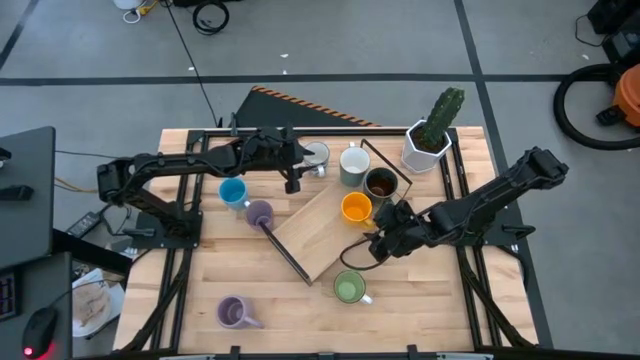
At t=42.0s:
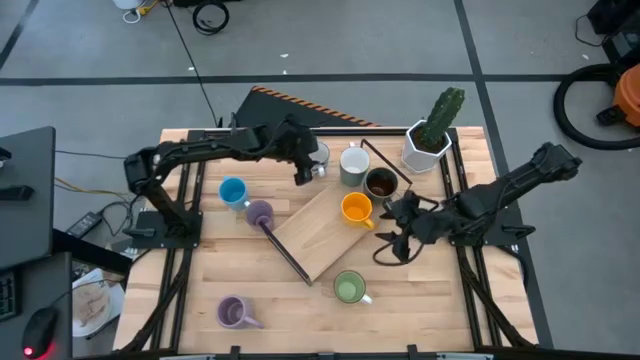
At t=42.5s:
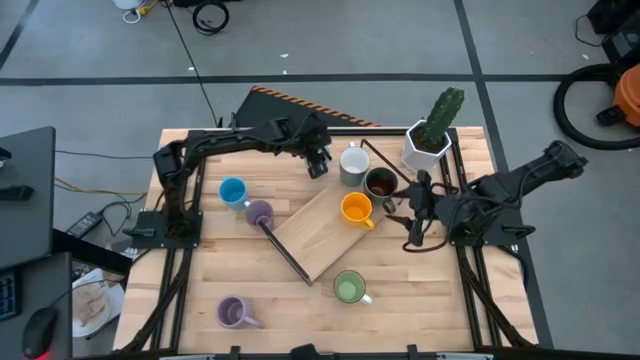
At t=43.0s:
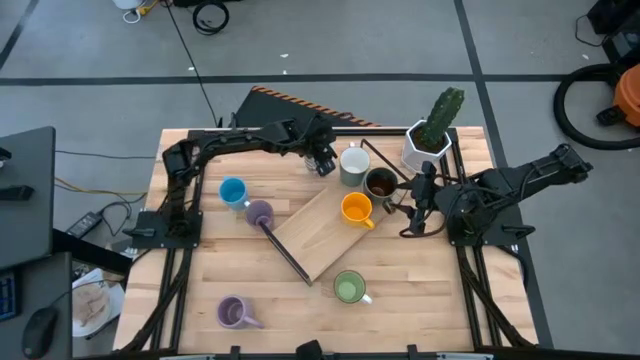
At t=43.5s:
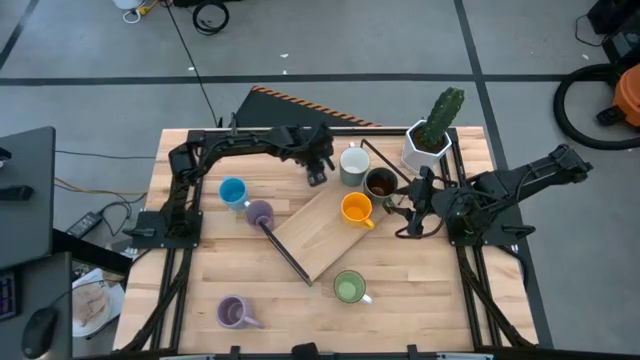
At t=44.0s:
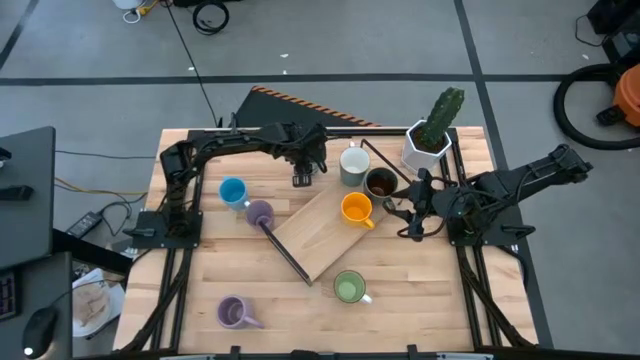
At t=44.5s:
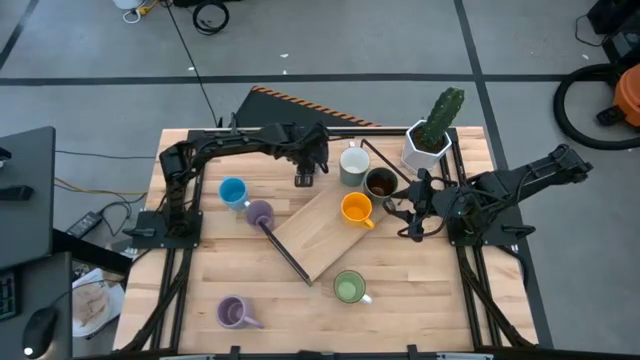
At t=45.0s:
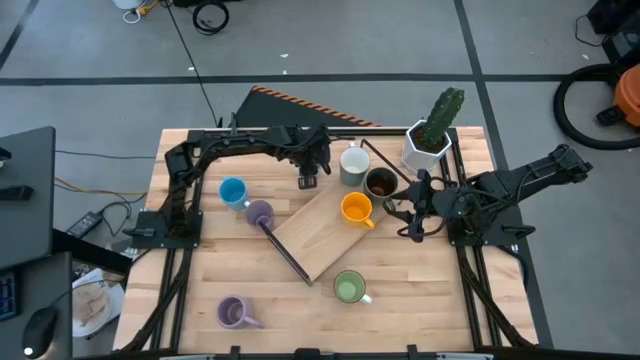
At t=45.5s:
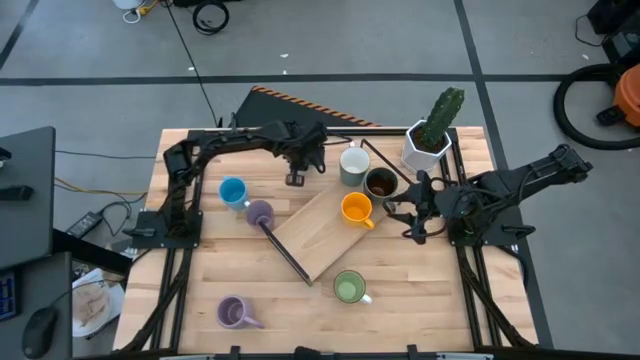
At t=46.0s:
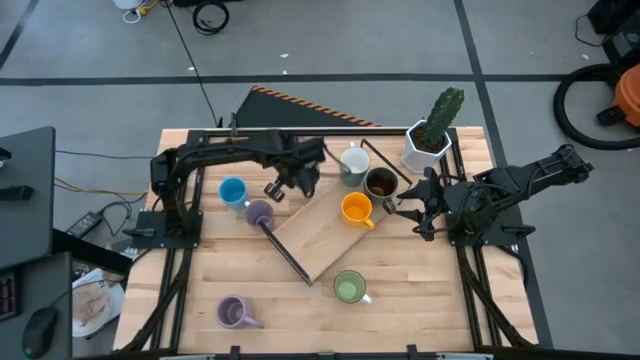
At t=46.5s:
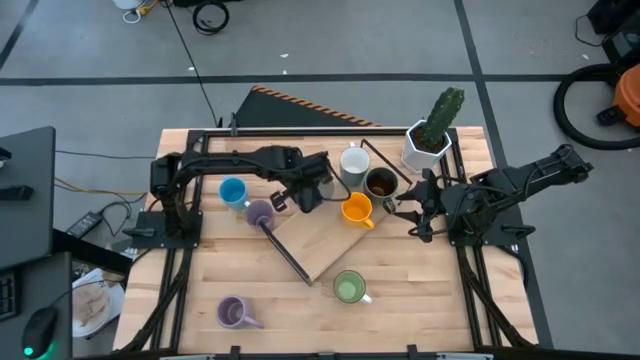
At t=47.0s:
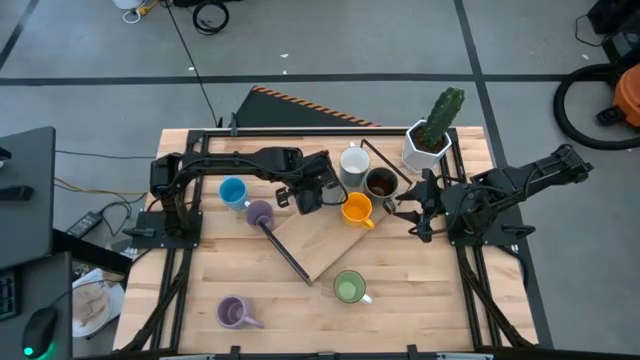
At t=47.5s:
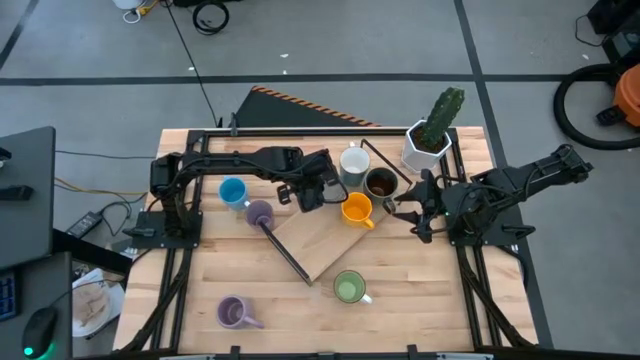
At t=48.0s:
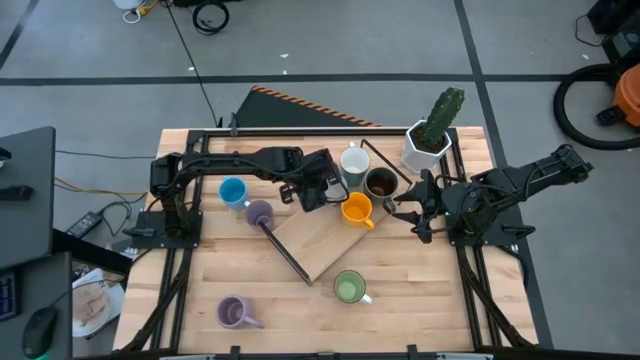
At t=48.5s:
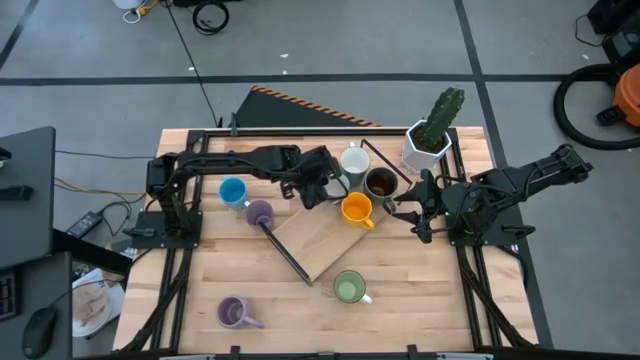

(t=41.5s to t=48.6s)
Task: Place coffee mugs
Put the white-blue mug on the shelf

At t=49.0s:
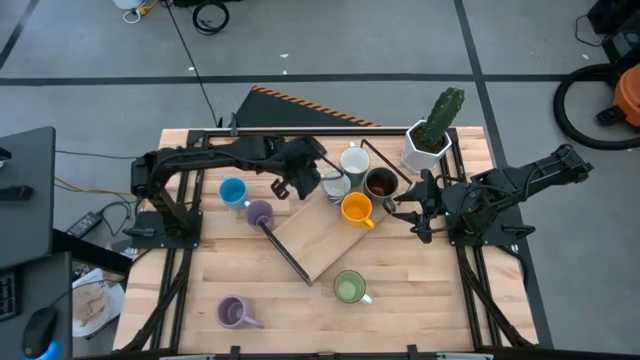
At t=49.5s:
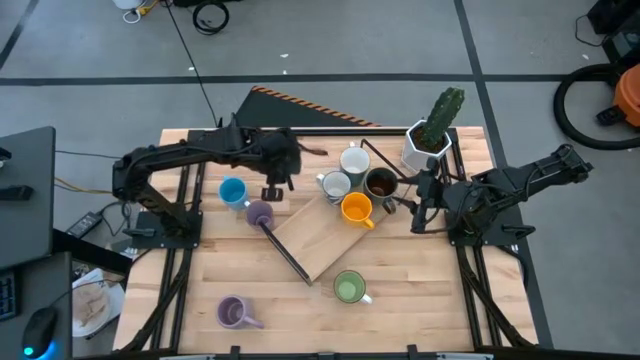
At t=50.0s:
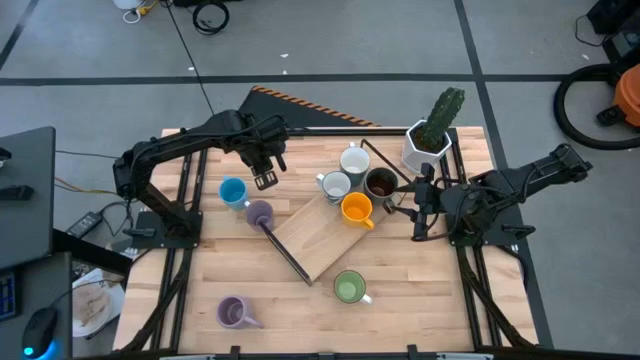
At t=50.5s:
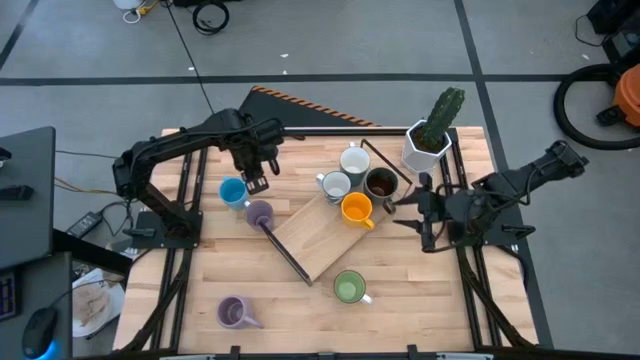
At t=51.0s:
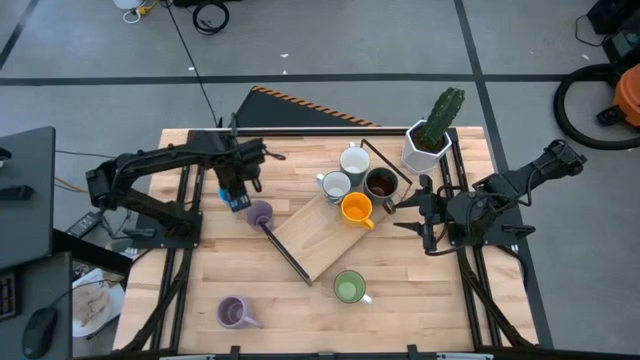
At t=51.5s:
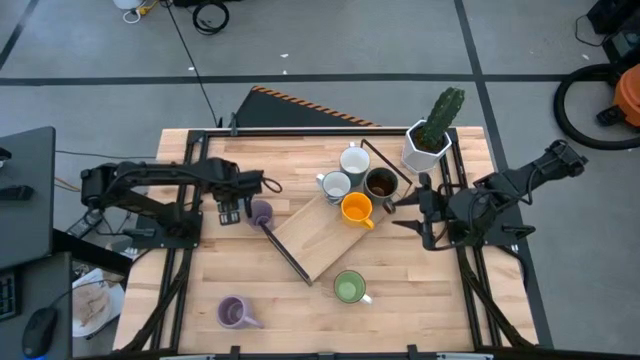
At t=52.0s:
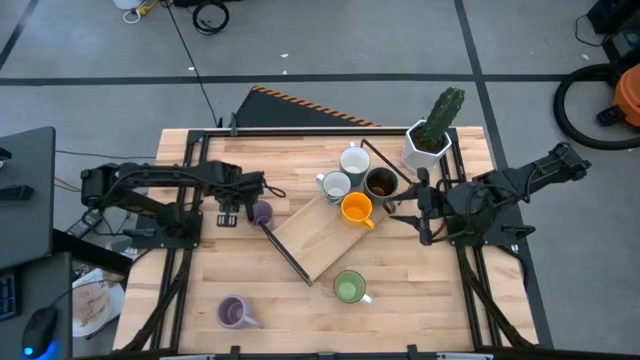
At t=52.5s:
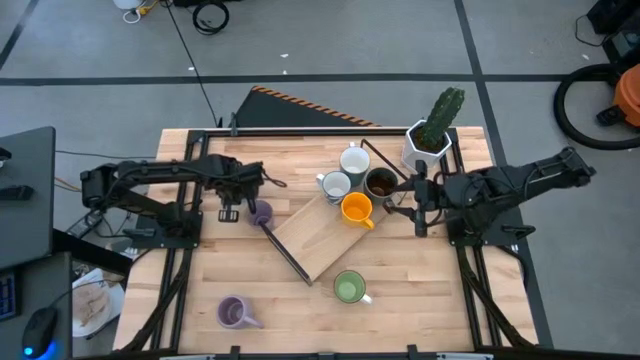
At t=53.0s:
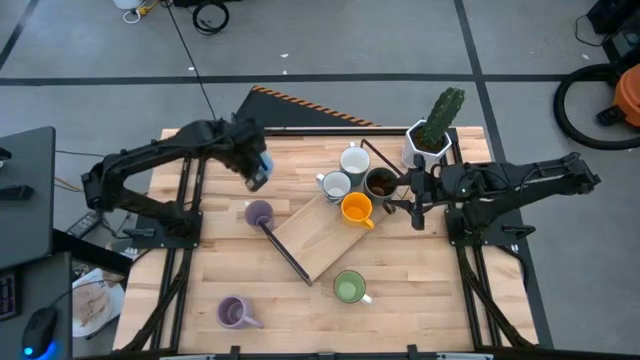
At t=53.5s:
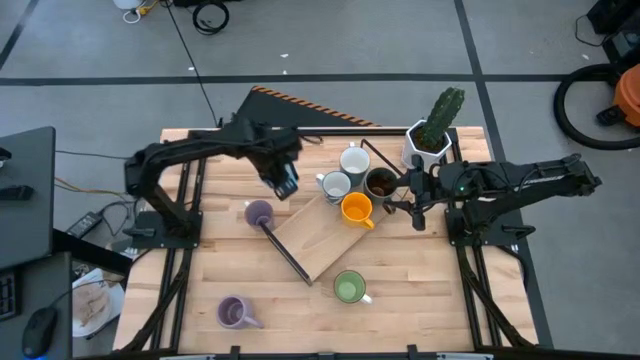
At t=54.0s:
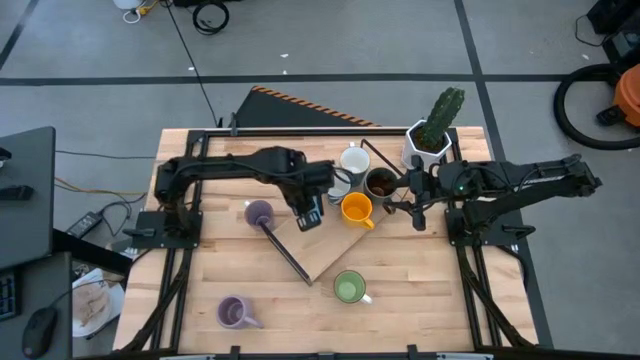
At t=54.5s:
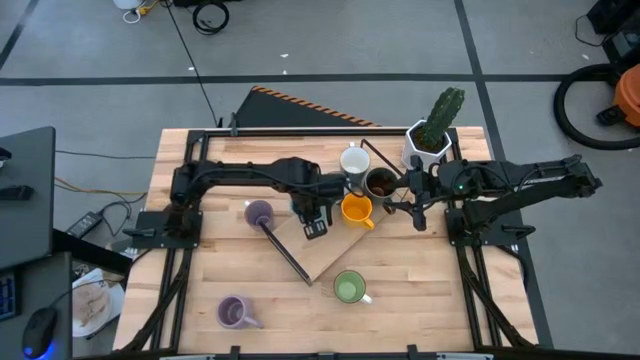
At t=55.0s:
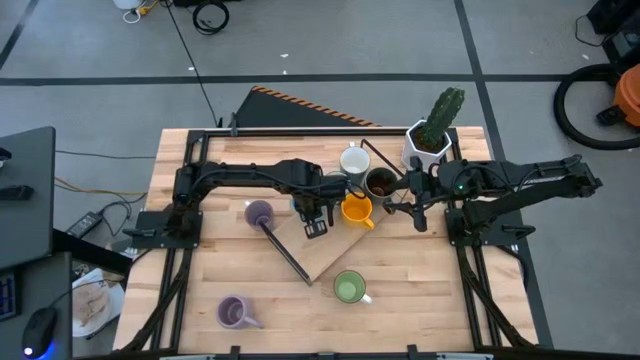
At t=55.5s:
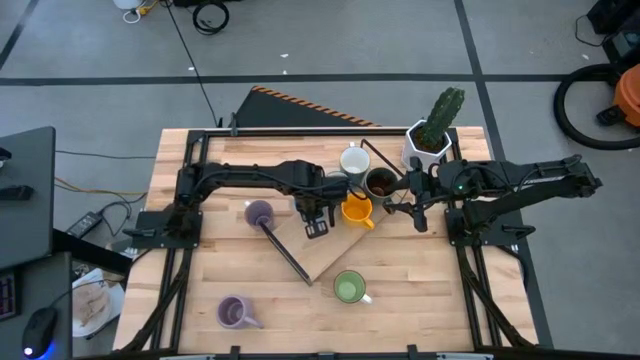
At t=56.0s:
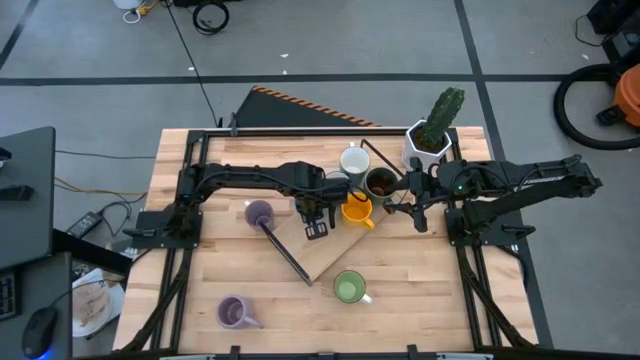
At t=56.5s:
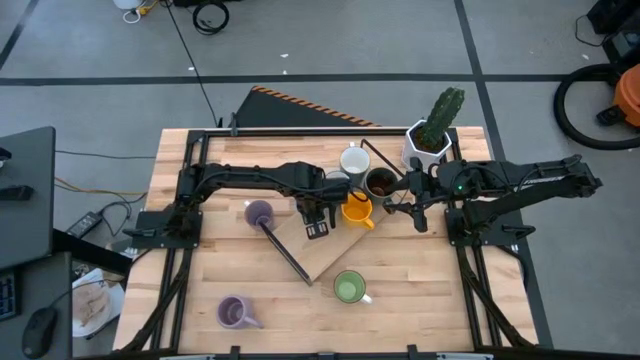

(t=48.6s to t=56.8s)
Put the light blue mug on the shelf

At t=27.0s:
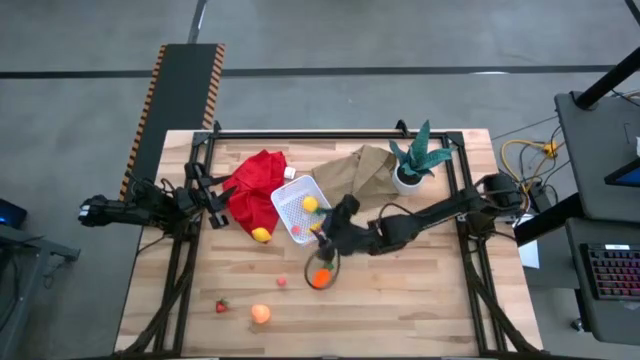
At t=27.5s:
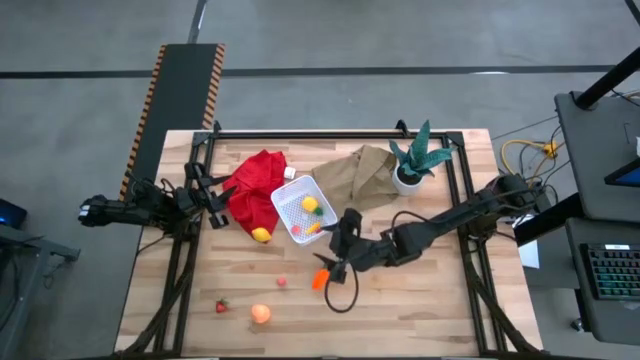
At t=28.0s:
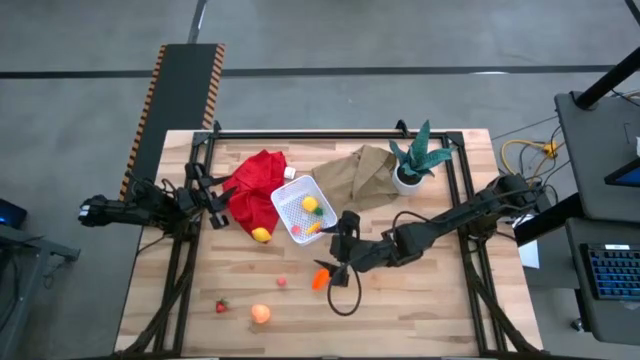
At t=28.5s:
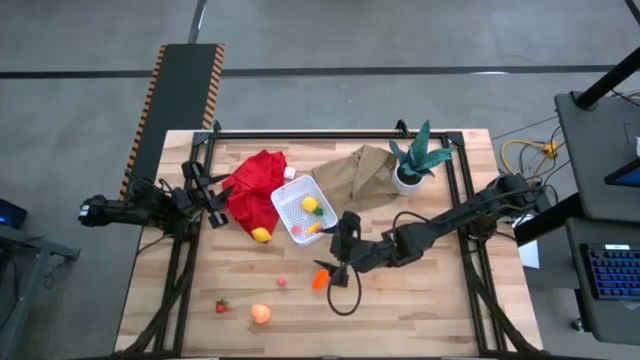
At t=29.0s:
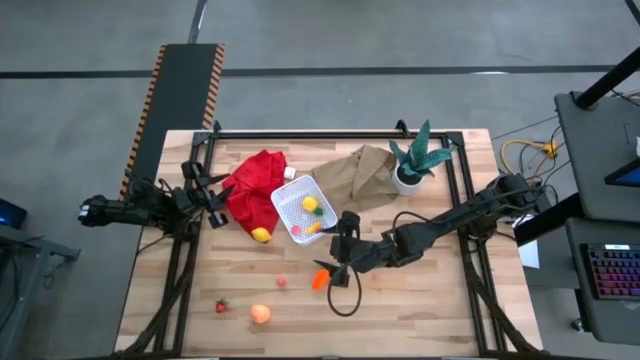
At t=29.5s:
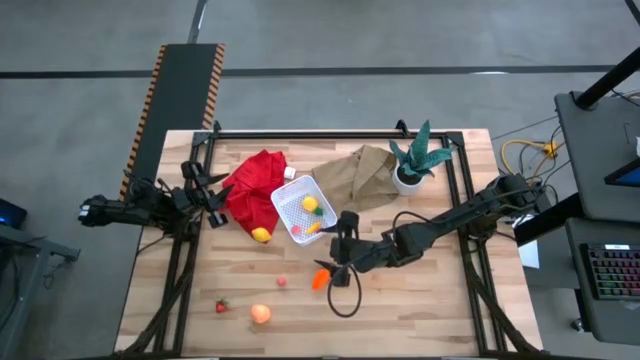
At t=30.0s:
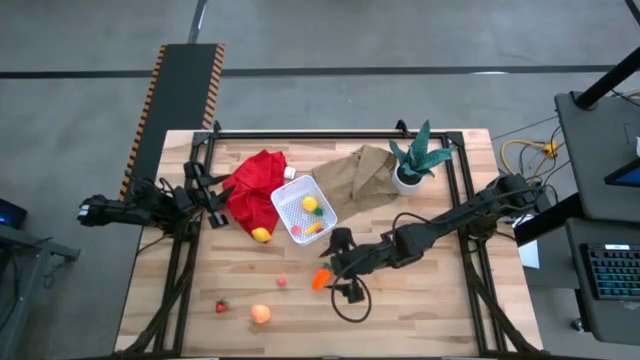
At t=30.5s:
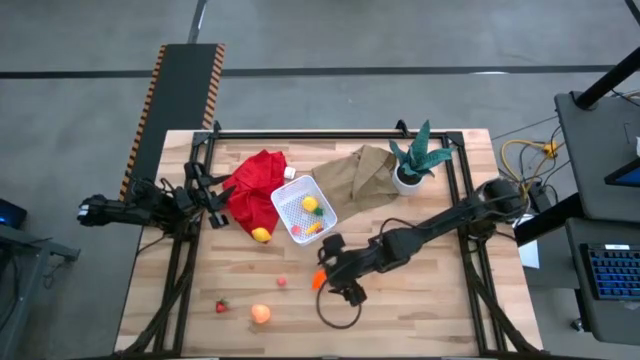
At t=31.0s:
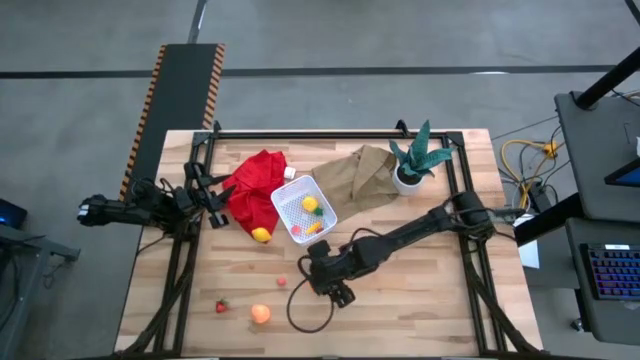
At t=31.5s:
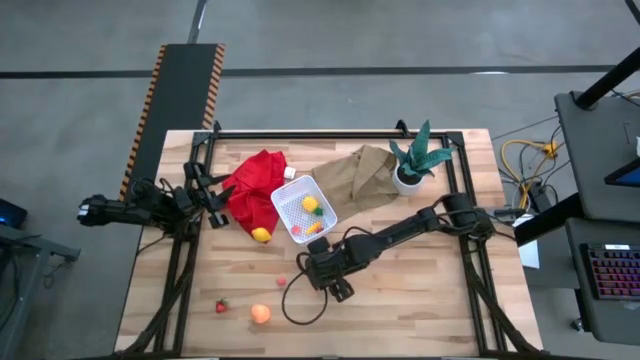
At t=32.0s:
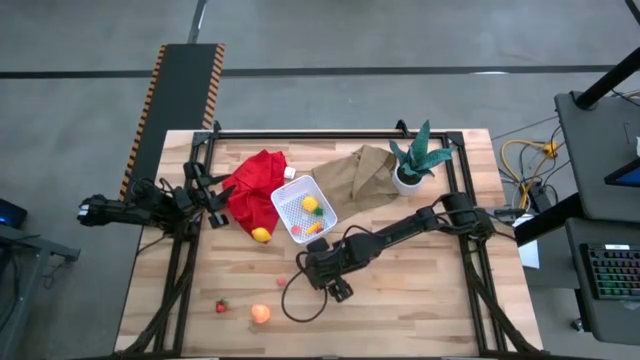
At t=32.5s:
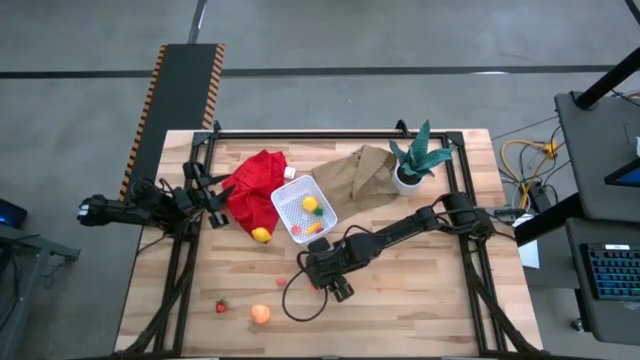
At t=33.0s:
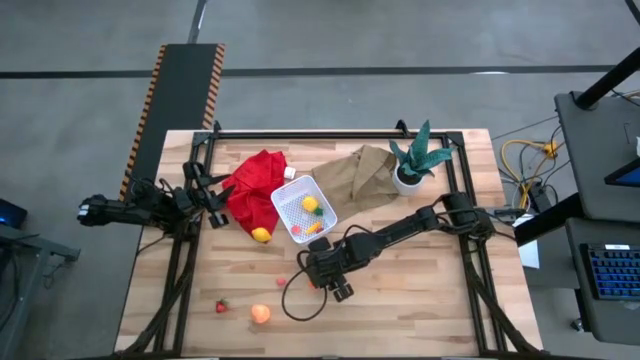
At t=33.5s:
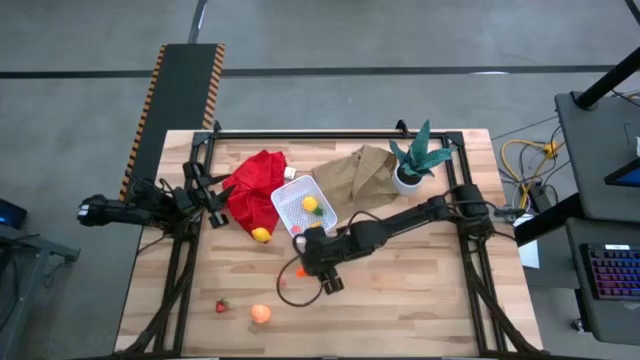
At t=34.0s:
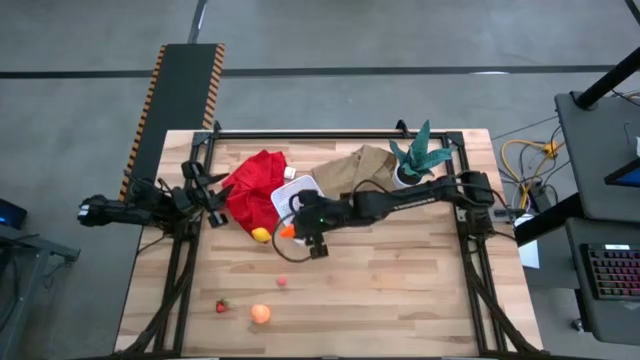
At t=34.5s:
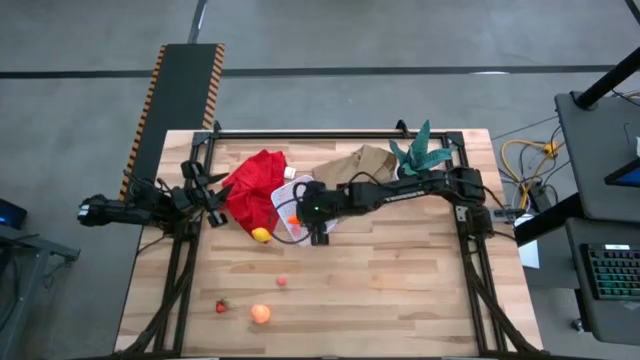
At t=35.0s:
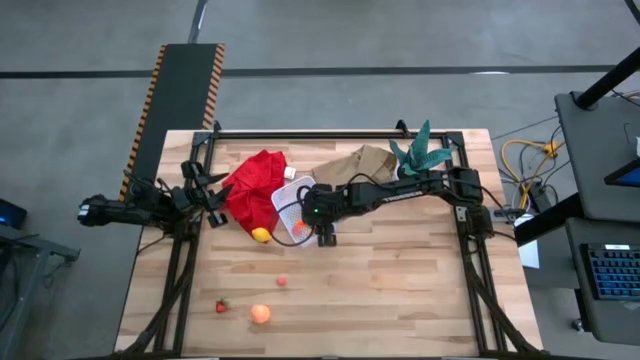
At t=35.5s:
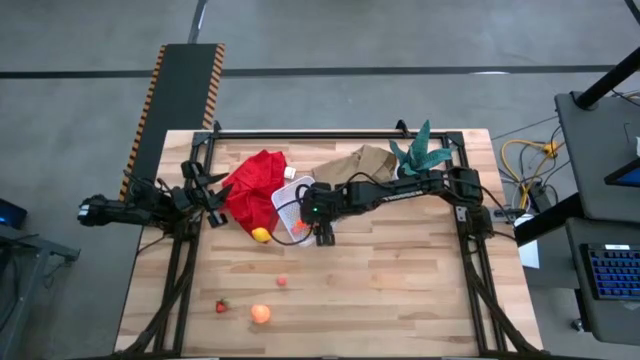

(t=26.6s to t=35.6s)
Task: Pick and placing Produce into tupperware
Put the toy carrot into the white bin
